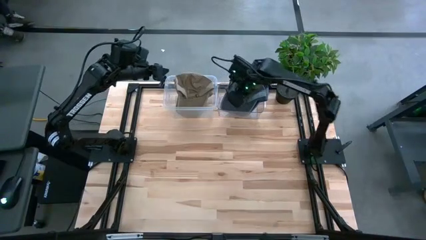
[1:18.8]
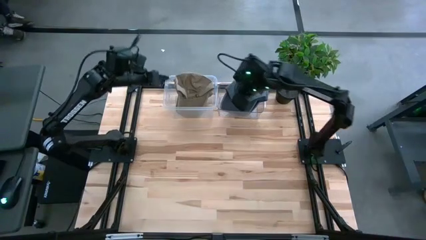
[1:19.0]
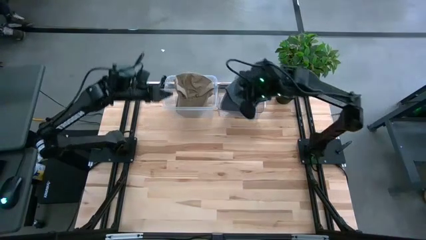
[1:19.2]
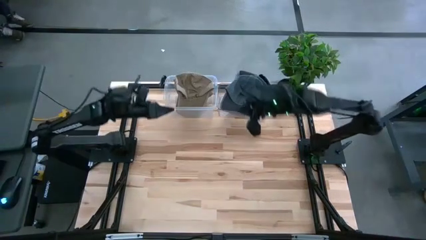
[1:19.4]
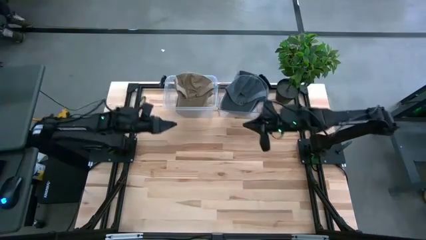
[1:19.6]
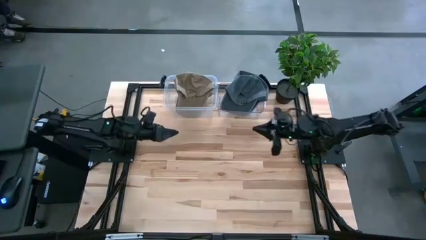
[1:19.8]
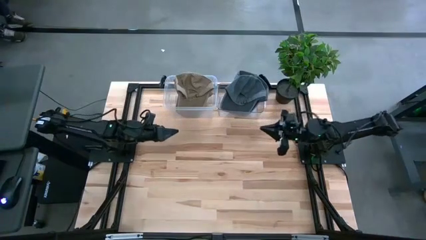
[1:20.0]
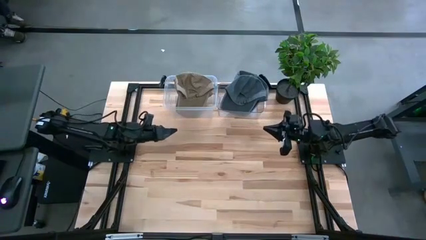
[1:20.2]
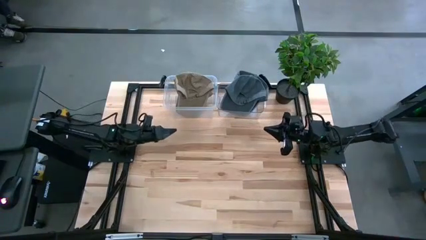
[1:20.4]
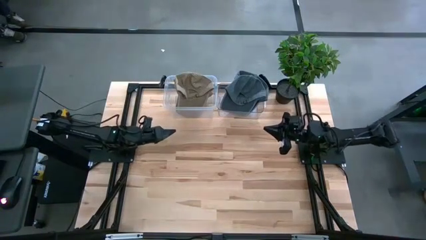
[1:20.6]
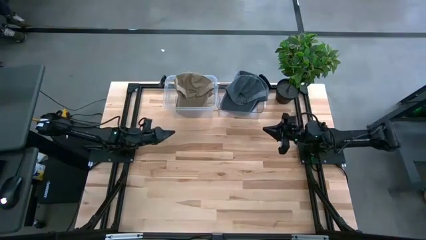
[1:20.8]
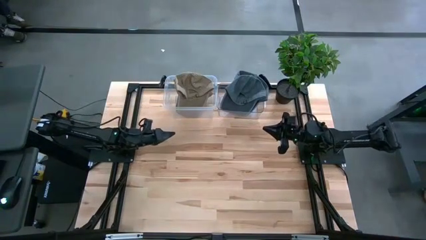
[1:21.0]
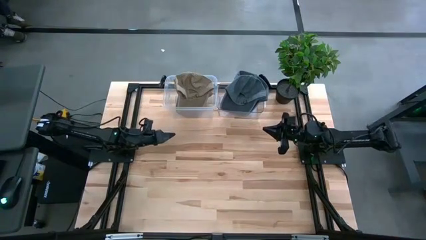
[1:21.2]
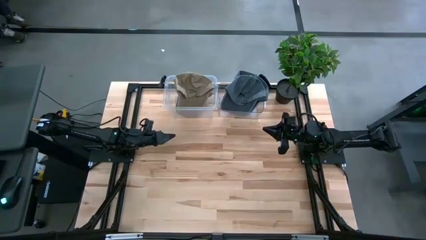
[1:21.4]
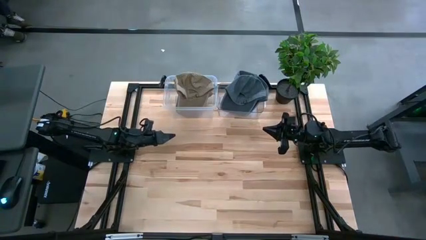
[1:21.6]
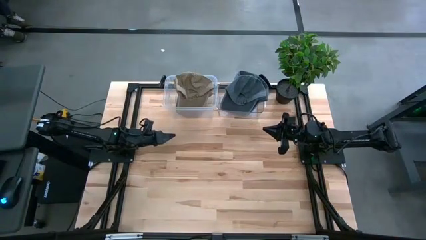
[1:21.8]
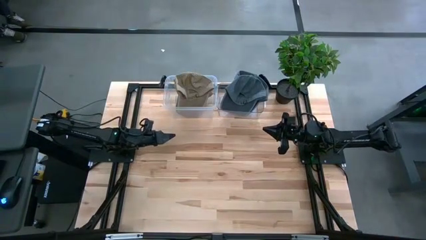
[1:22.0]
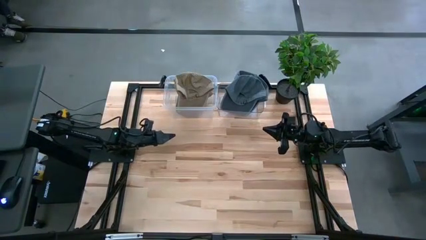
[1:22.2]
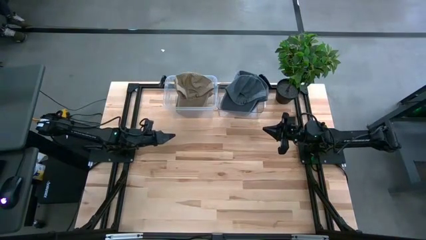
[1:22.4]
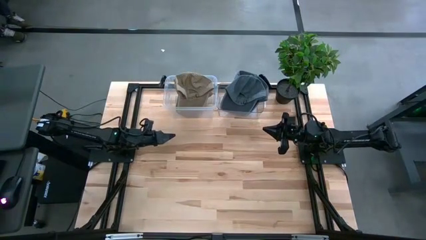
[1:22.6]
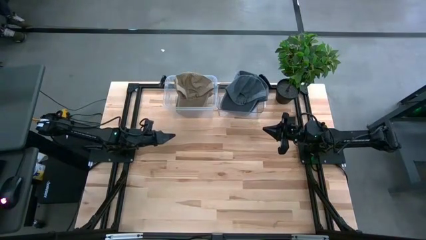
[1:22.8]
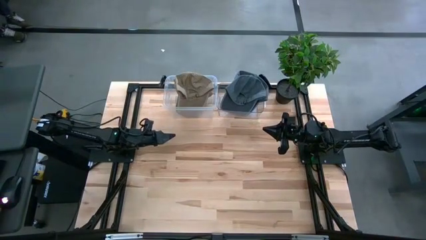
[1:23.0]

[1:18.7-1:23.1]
Task: Pick & Place hat
Return to Home Position

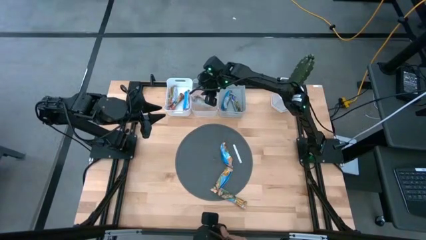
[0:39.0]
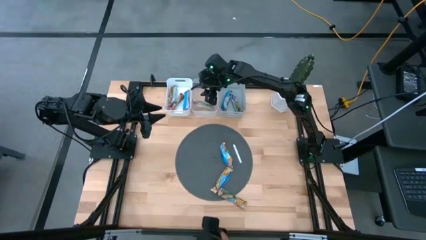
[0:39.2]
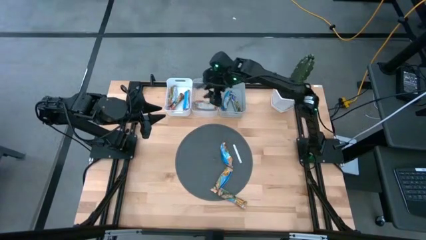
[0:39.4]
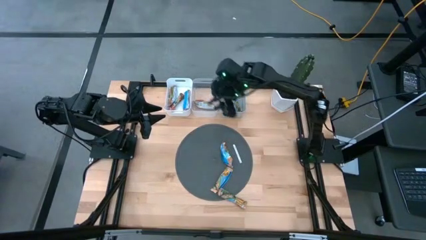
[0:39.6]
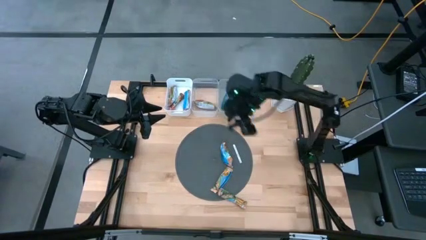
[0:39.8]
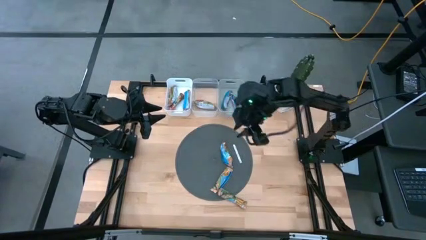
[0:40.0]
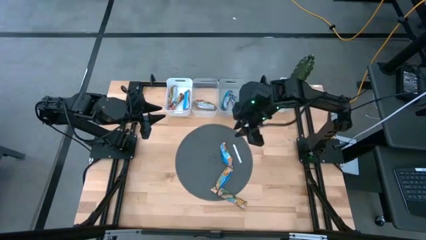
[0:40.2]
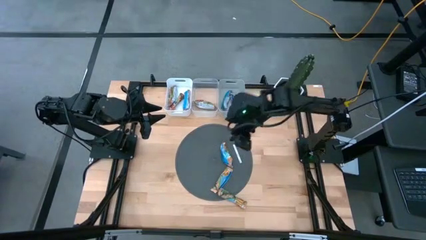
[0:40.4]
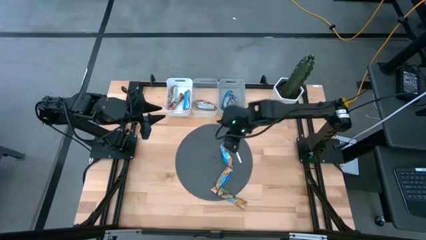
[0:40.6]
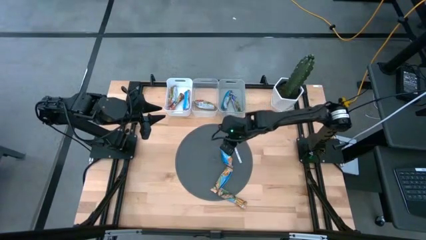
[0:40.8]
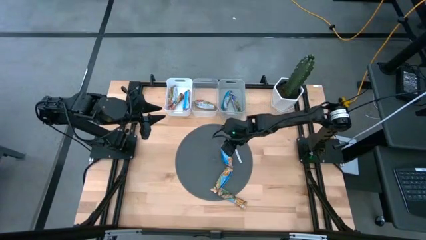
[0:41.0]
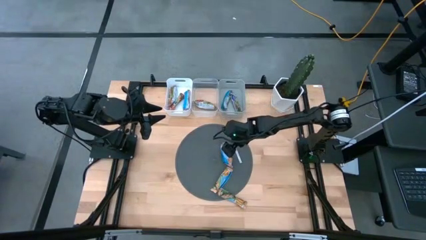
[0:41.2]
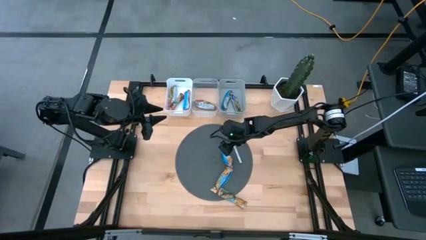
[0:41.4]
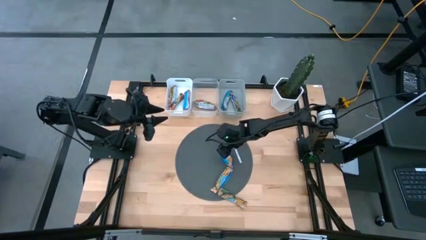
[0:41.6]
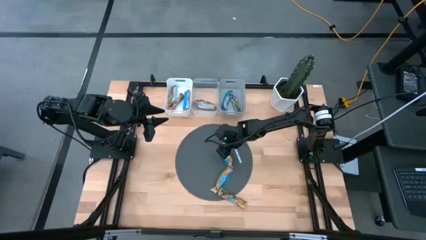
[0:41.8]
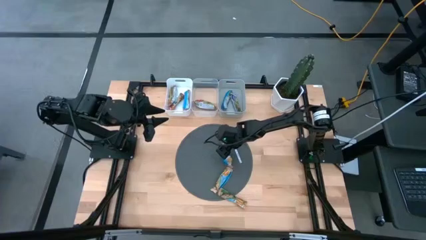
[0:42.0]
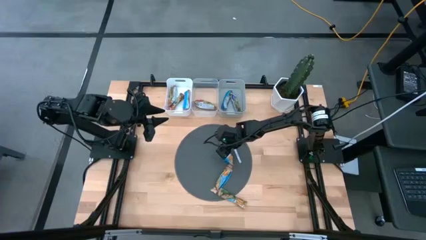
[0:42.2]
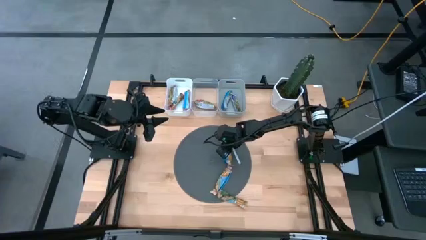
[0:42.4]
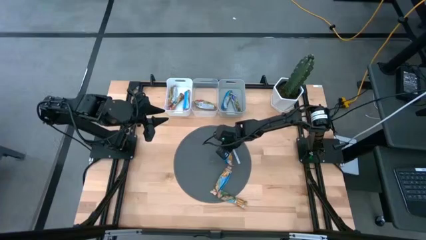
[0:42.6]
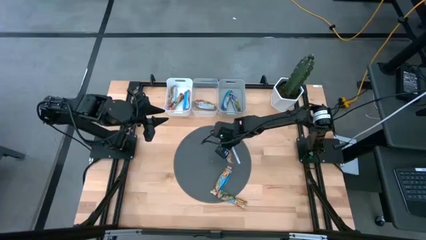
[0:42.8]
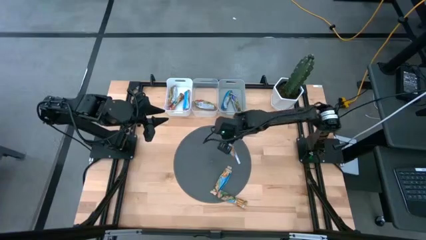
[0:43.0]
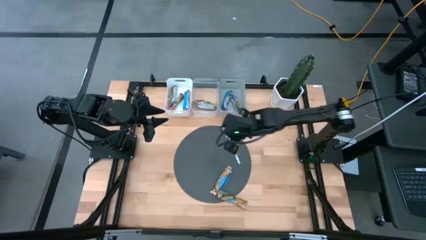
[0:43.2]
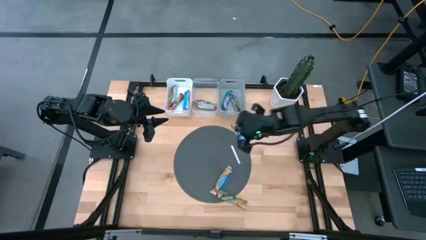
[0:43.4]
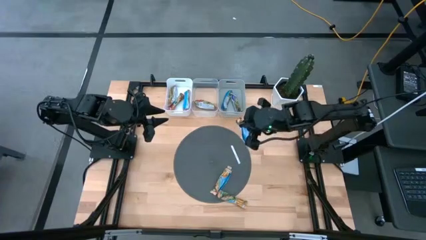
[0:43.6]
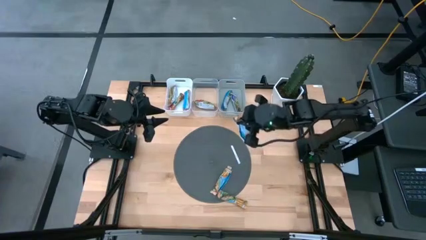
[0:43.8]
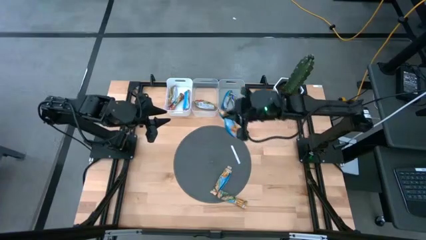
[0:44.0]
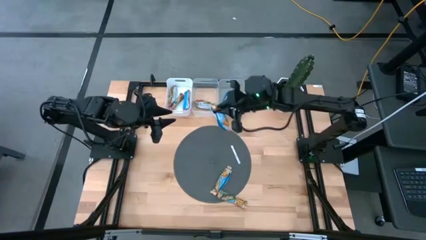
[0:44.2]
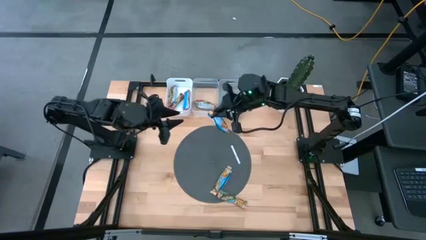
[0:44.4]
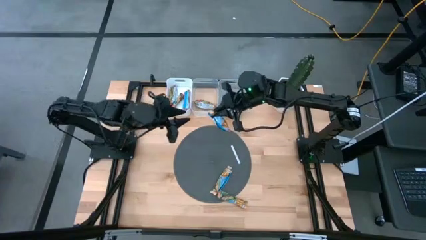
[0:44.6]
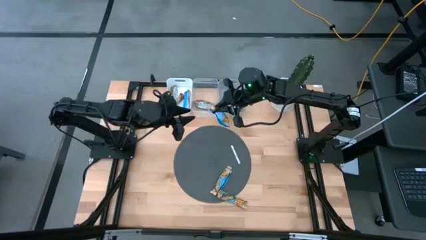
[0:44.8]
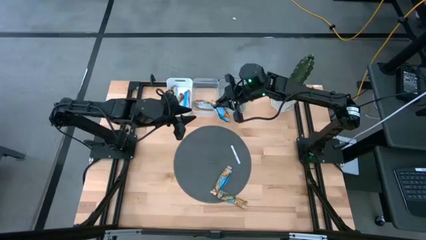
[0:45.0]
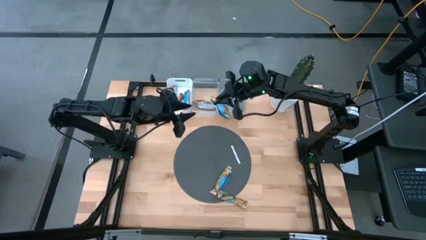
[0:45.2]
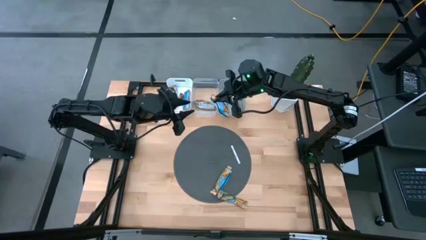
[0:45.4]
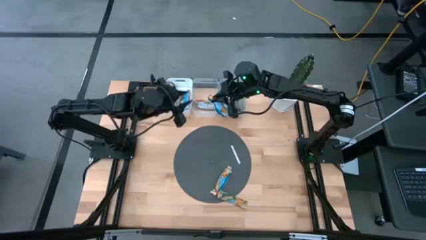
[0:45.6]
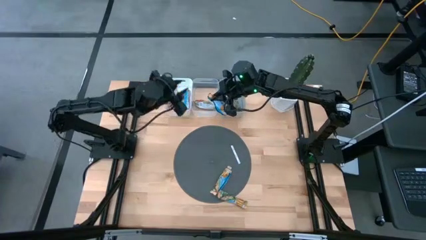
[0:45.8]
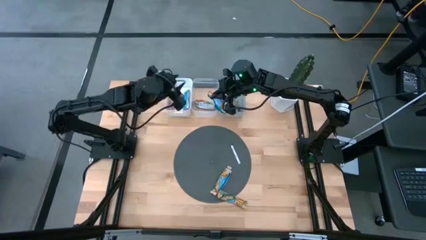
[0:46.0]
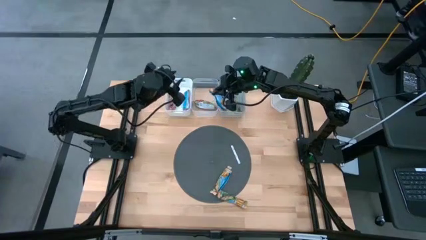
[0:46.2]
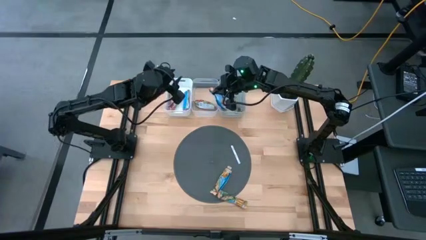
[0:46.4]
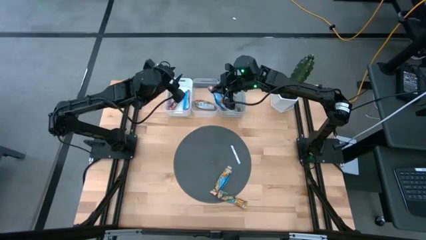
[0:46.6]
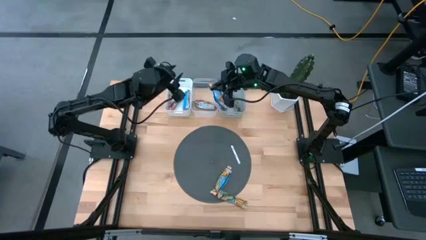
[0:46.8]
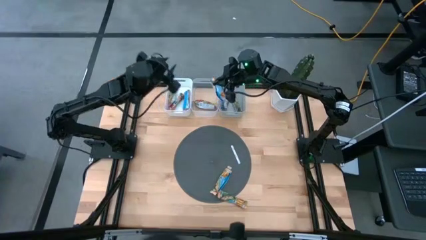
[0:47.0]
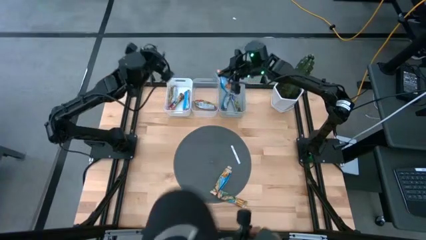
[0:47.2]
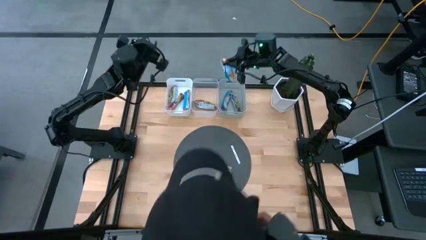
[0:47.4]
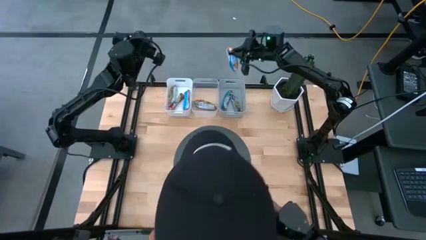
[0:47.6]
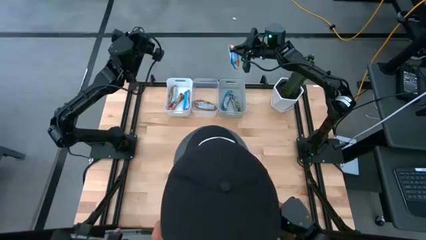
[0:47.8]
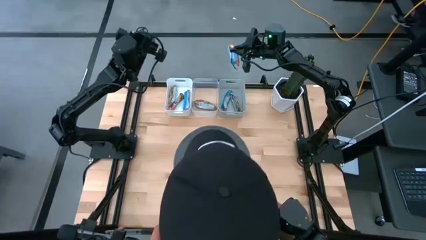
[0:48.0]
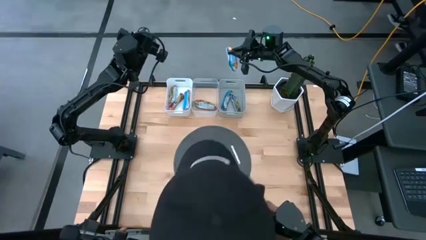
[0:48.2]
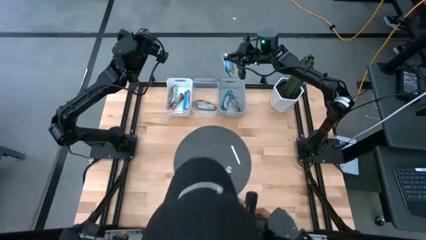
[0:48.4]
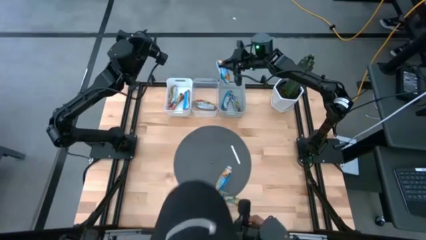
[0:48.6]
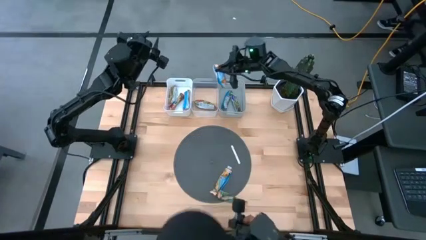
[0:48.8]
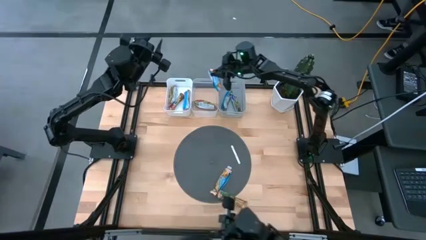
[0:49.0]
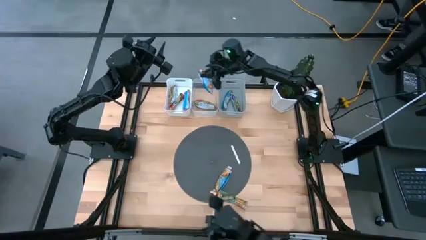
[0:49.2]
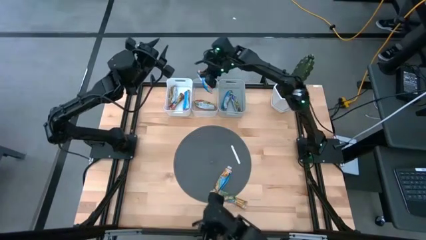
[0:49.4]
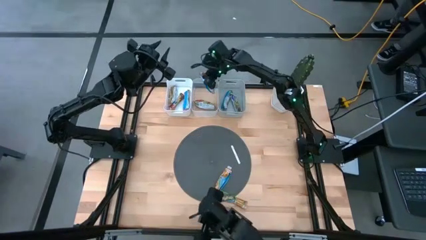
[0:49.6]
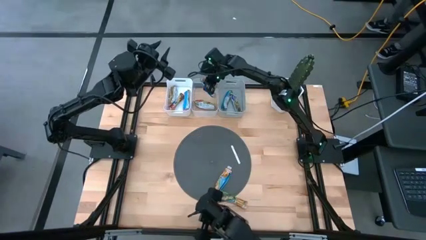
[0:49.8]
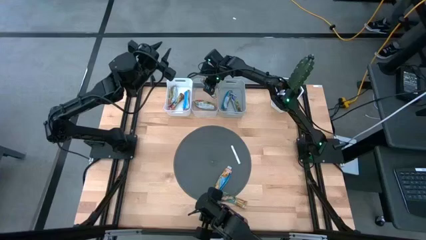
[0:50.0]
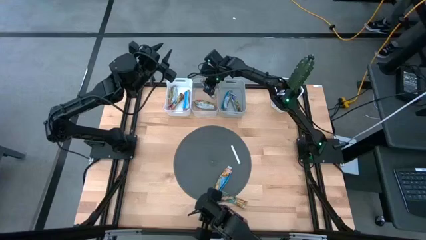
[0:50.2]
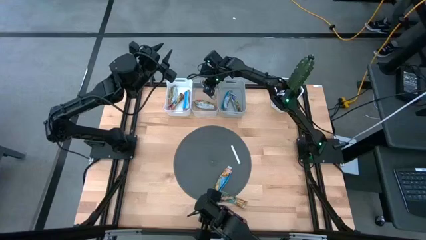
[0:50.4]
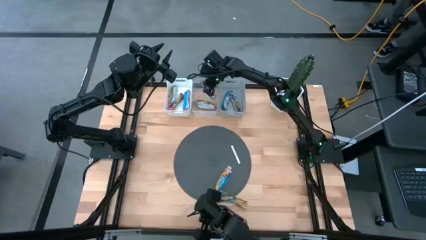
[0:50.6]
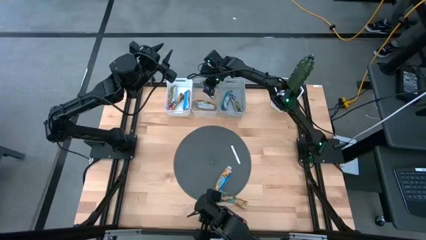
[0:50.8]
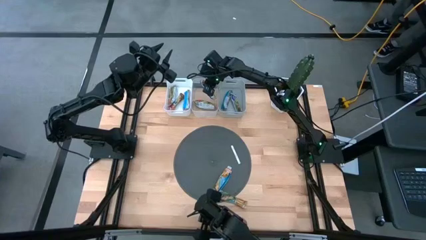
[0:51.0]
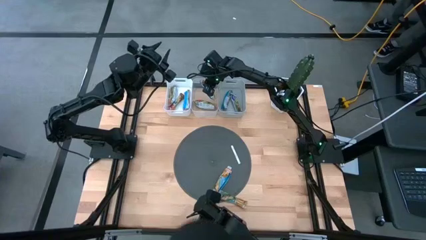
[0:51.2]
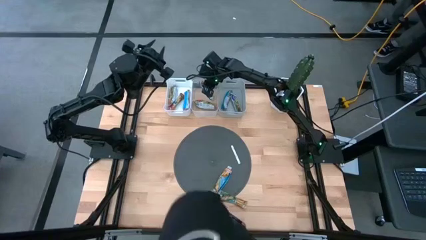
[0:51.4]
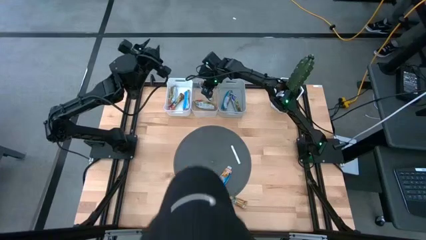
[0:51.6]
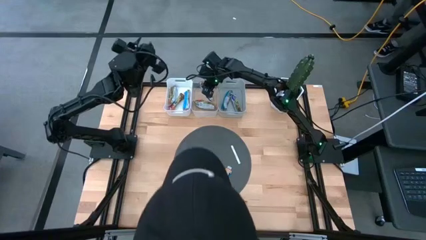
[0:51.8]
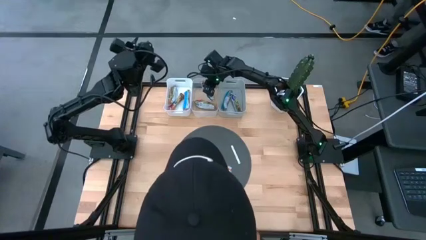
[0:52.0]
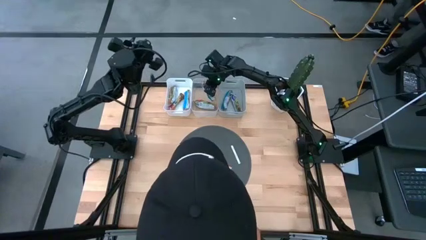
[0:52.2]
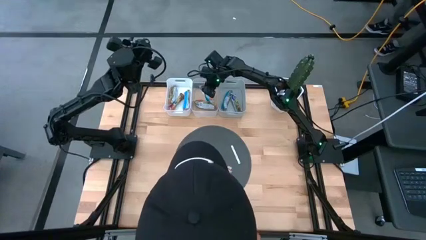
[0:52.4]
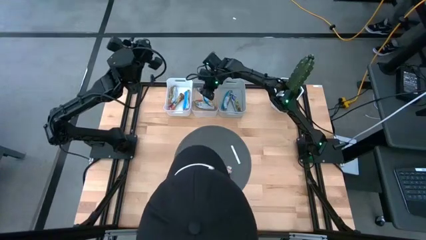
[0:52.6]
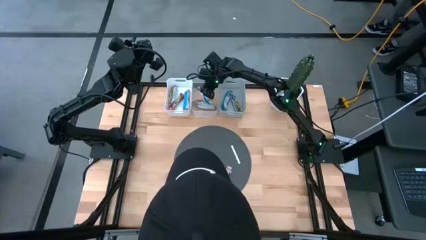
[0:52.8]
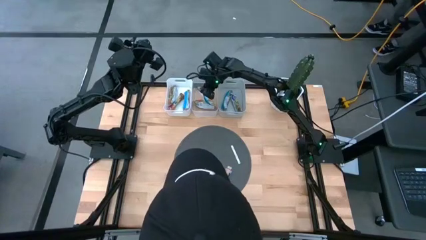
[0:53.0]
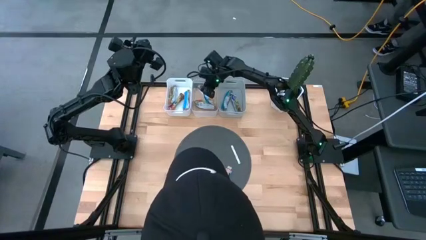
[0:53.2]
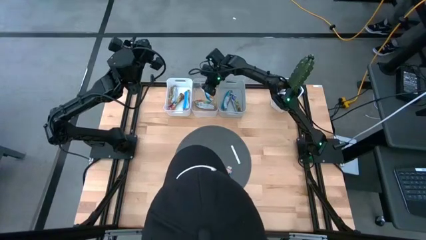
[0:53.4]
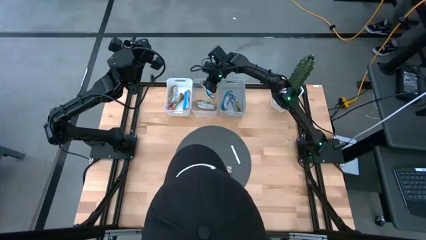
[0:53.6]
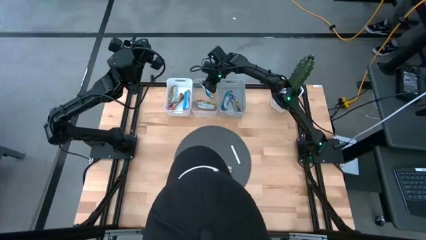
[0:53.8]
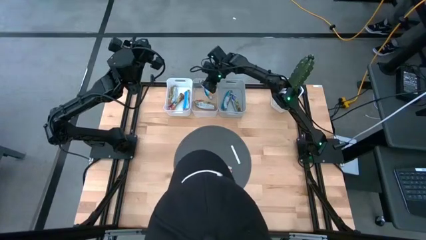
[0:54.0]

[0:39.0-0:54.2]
Task: Pick and place Granola Bars by type
Put the yellow granola bar into the transparent bin
